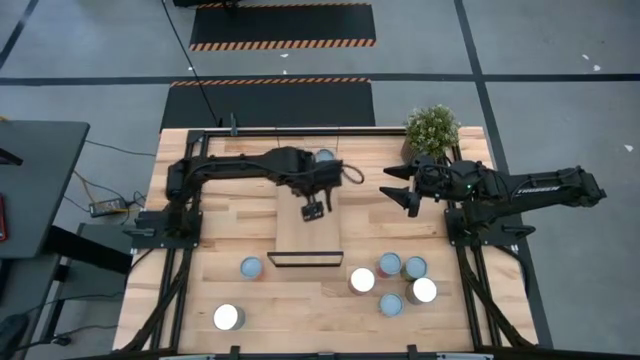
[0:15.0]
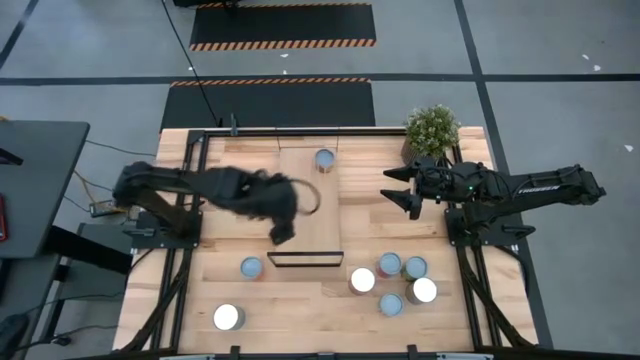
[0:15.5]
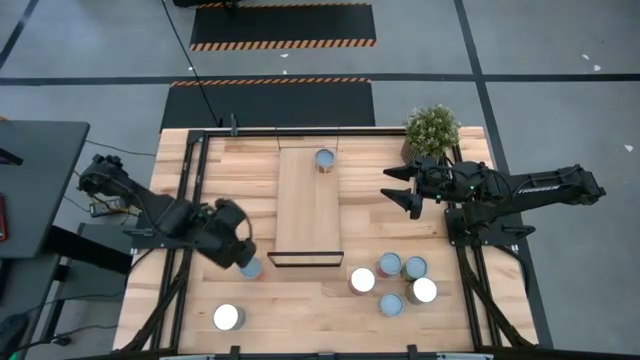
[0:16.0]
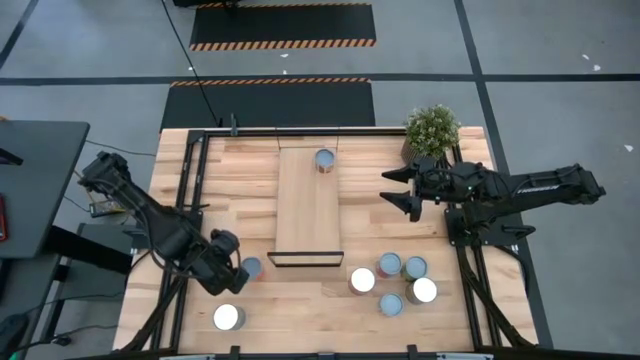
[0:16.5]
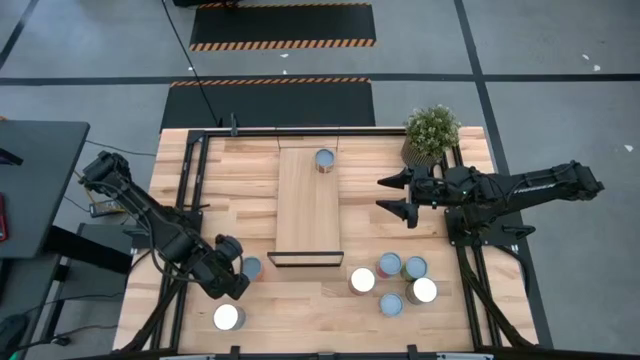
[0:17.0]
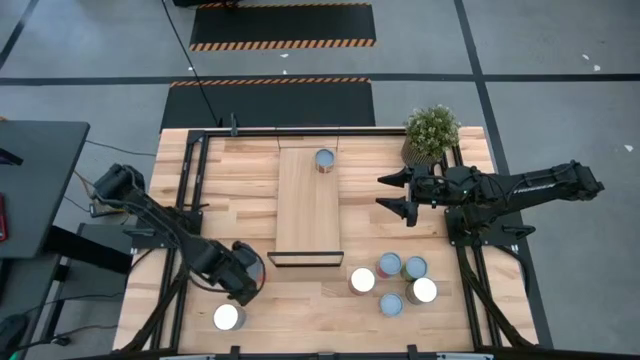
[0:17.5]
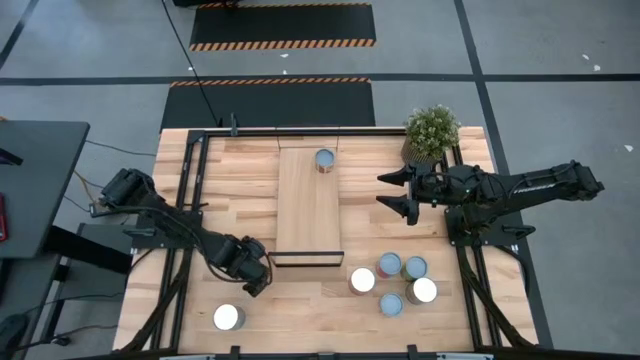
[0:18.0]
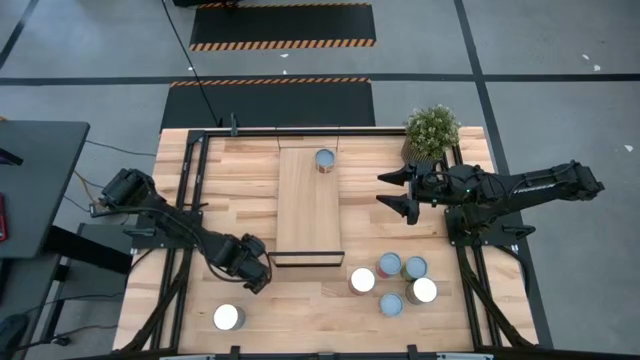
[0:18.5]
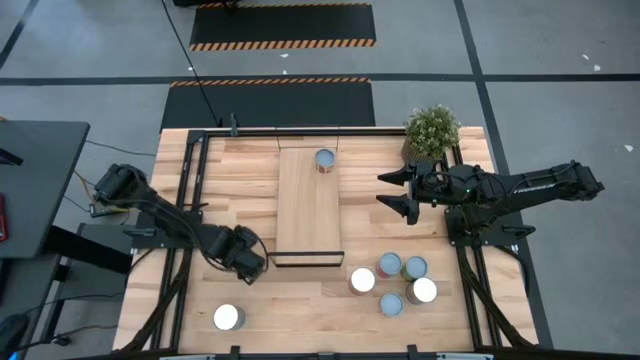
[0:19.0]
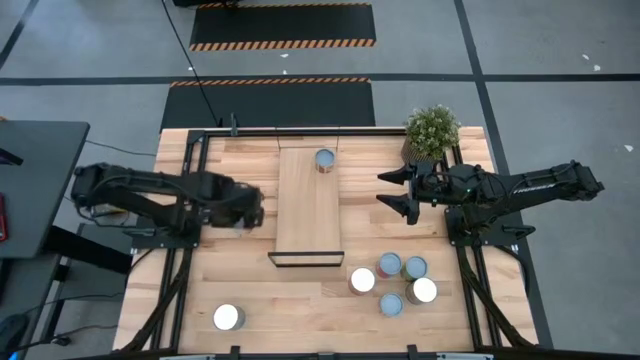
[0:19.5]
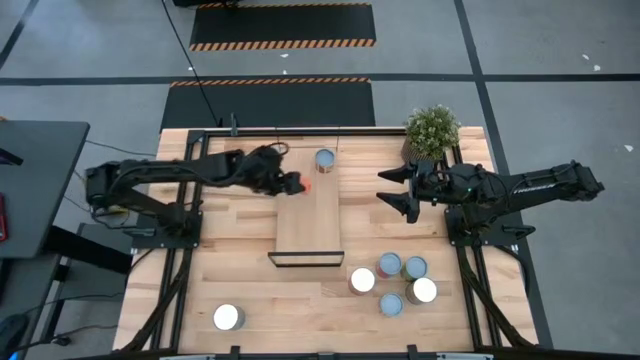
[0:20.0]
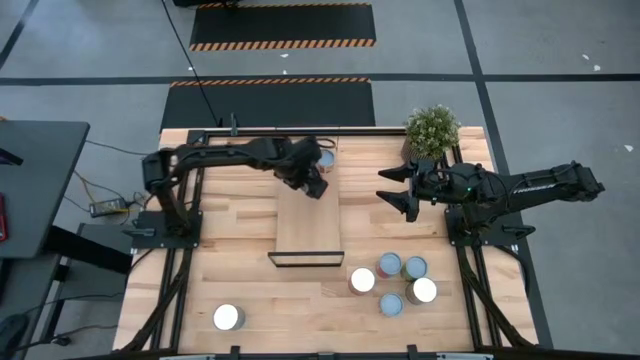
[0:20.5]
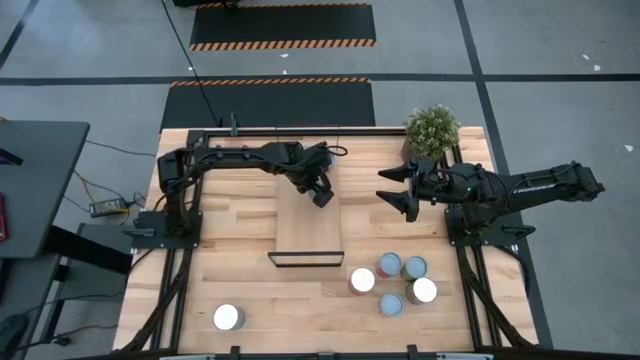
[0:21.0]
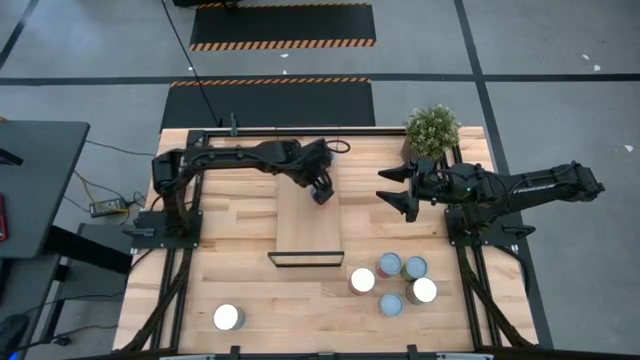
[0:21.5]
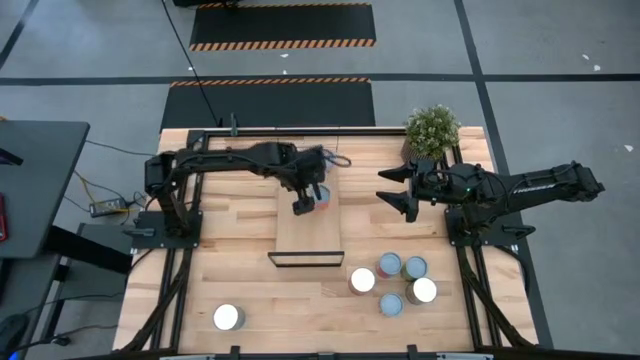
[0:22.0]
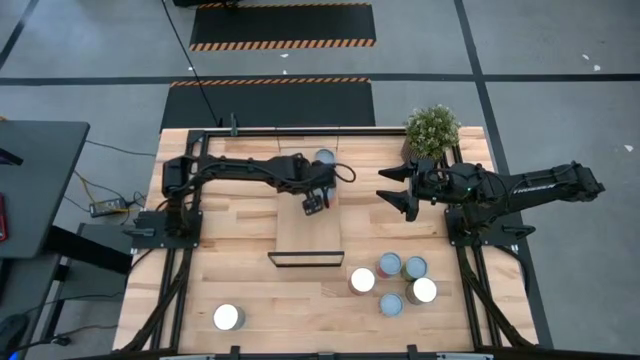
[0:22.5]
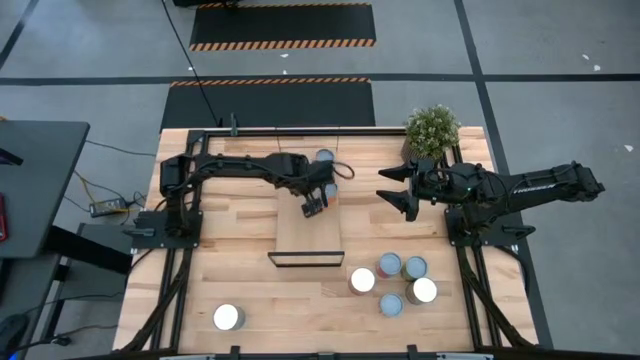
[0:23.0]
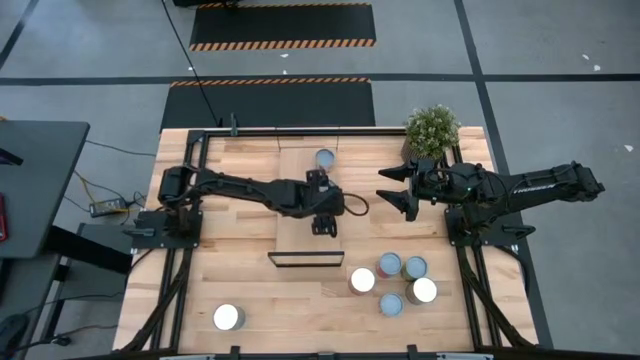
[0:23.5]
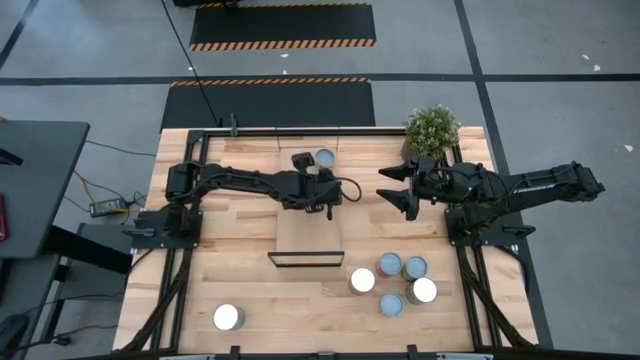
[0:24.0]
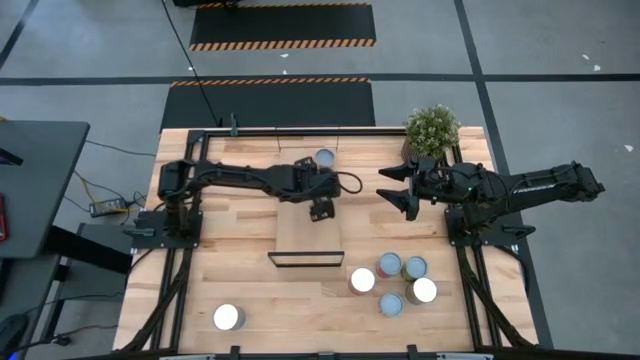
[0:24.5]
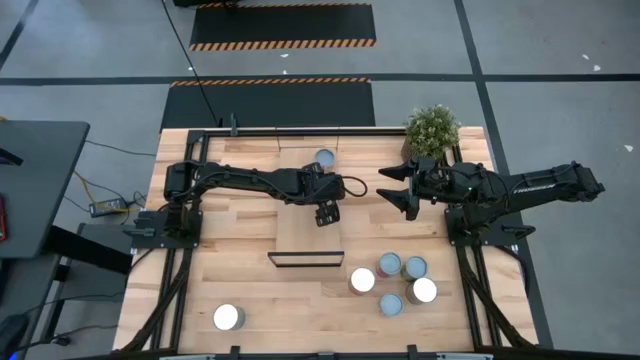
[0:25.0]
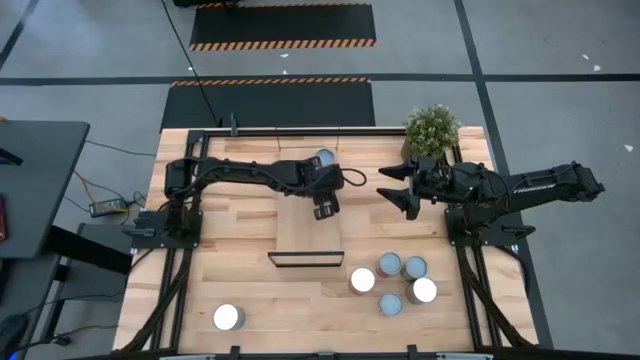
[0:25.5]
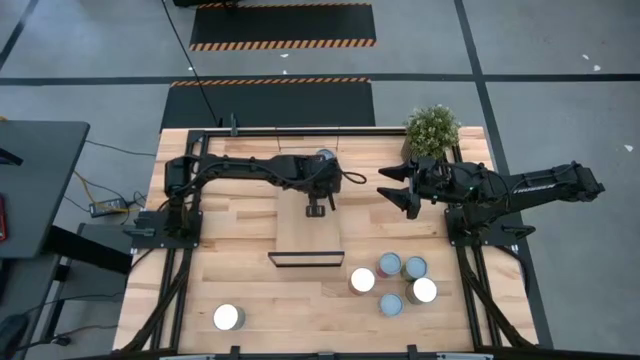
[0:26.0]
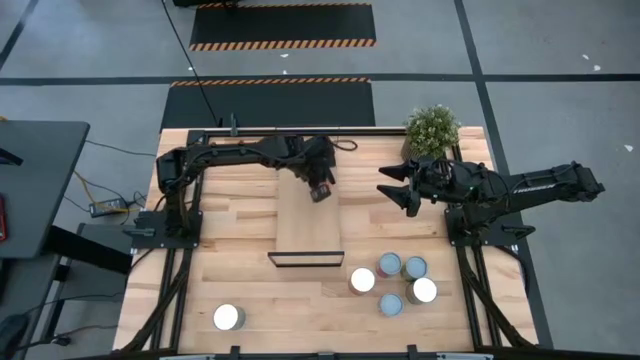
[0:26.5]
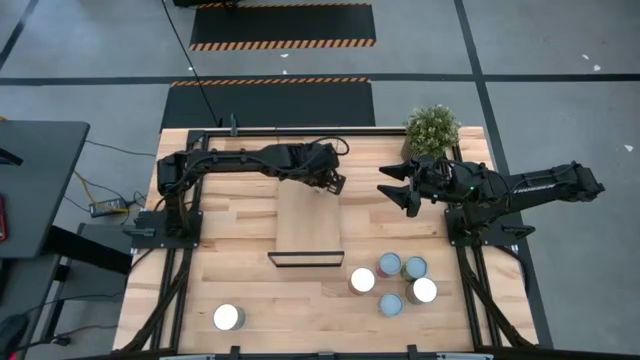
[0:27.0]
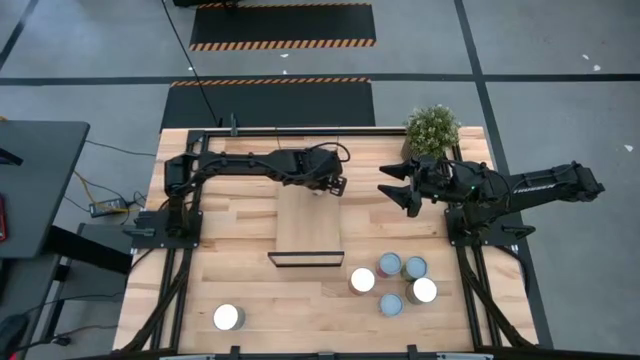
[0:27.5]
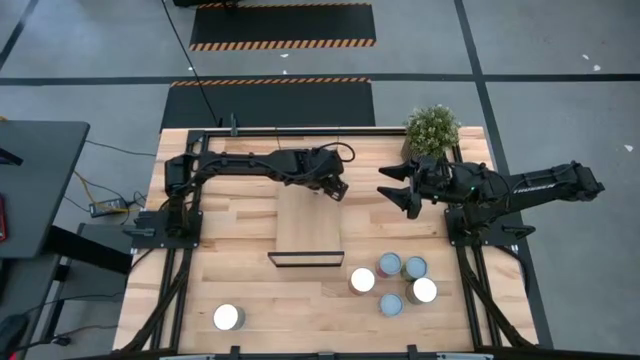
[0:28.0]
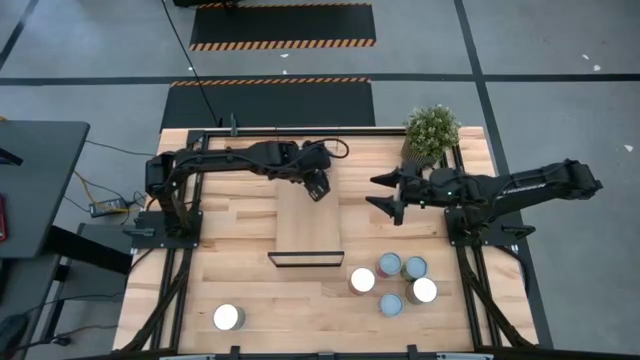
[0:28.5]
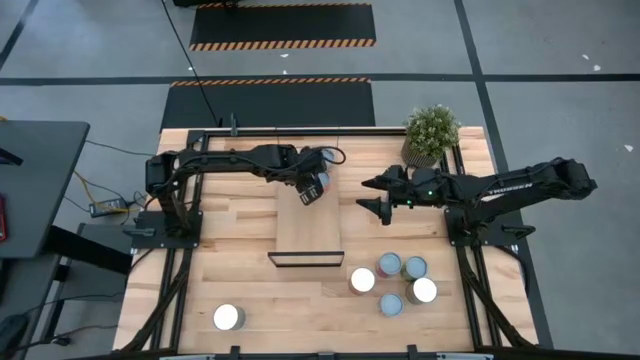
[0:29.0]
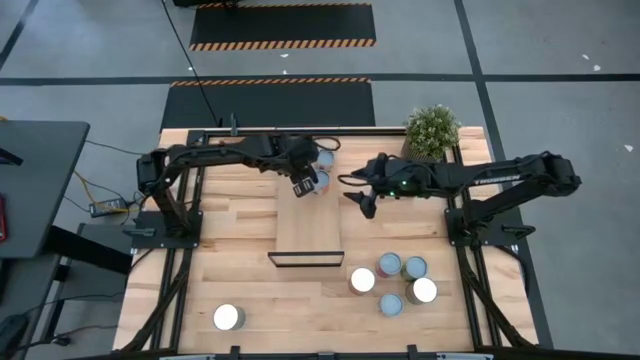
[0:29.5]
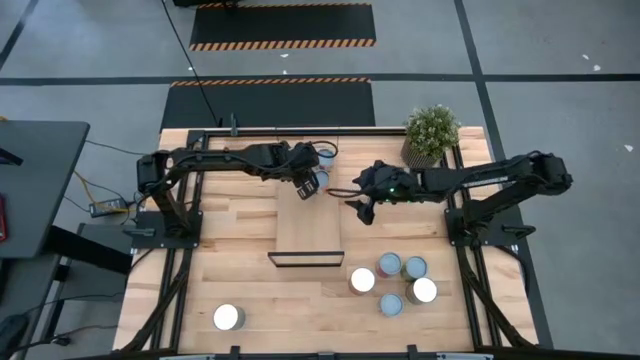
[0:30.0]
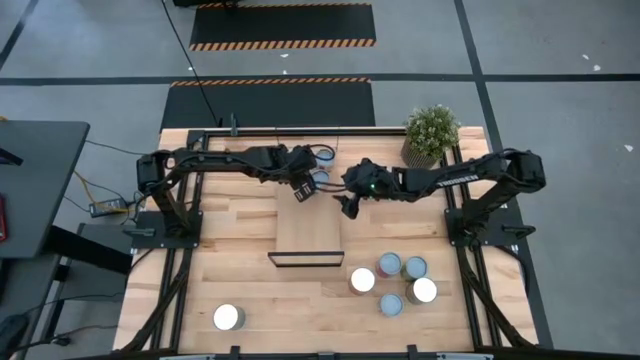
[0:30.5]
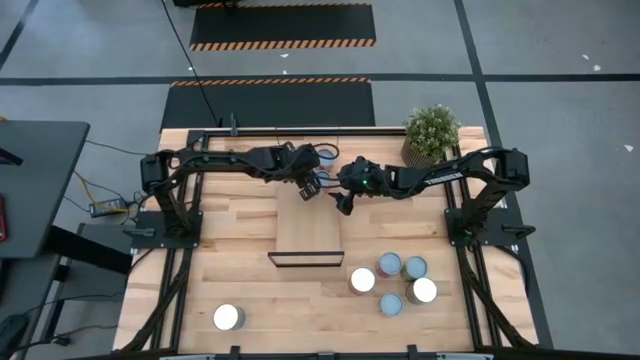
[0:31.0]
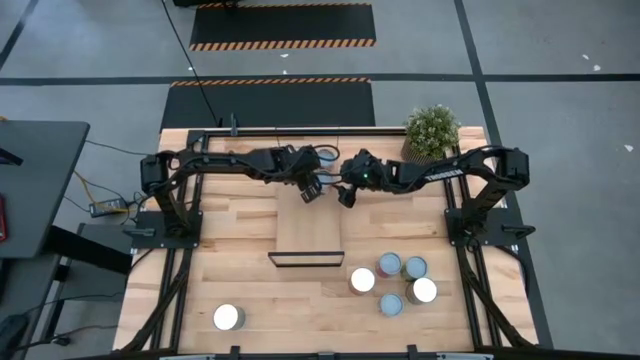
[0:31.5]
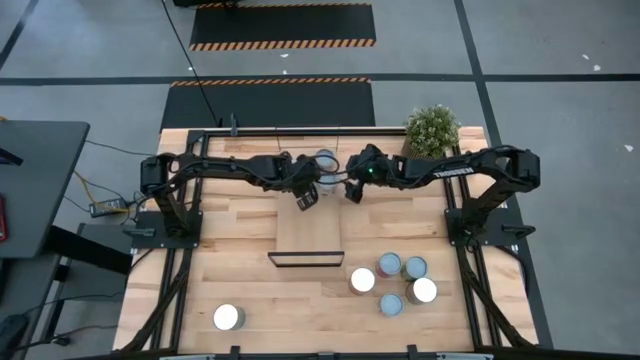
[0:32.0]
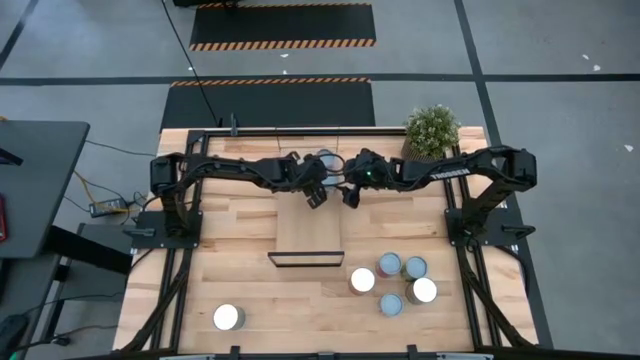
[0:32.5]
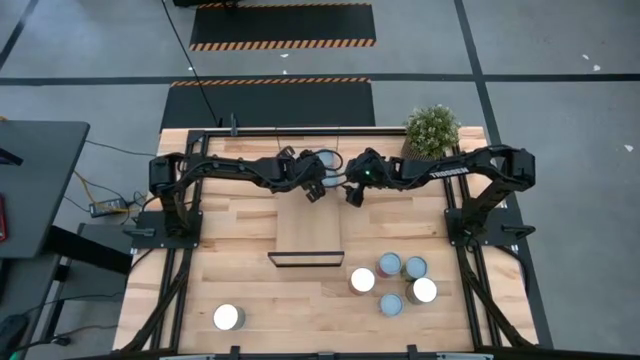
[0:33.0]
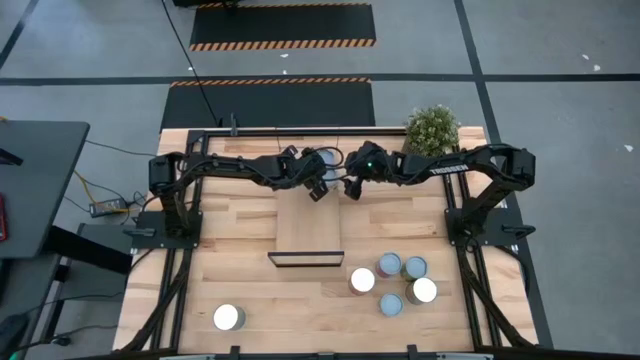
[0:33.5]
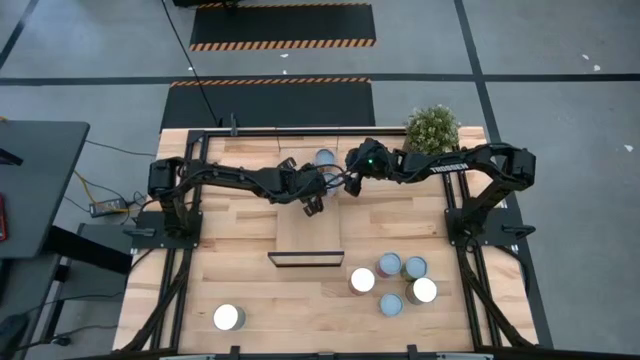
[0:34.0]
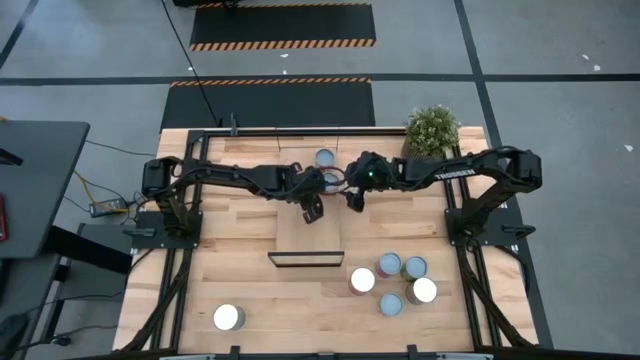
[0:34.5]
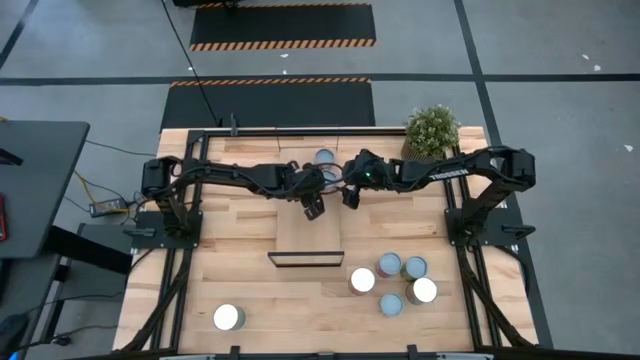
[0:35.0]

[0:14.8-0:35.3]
Task: Pick and place cans onto a shelf
Put the orange can on the shelf
